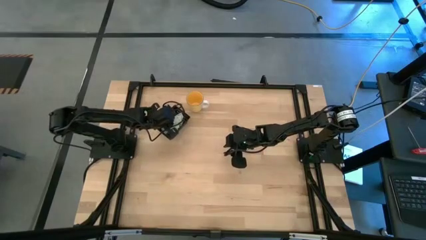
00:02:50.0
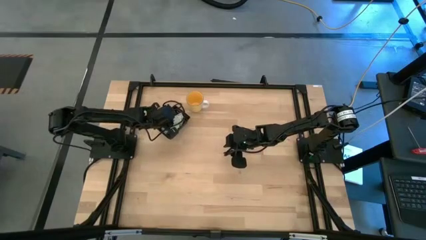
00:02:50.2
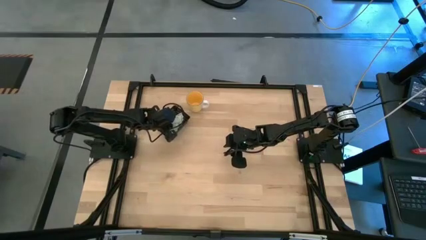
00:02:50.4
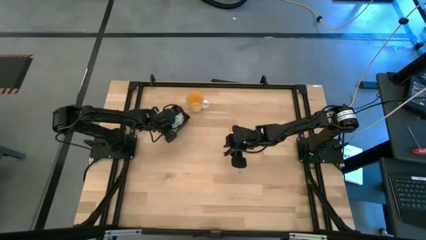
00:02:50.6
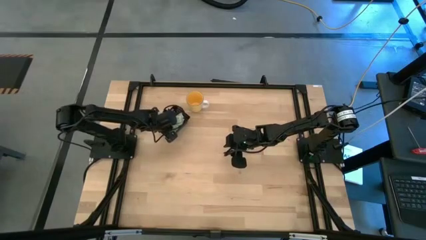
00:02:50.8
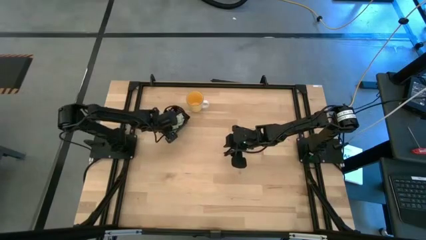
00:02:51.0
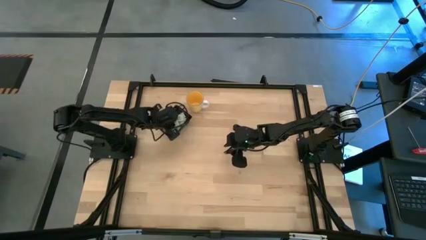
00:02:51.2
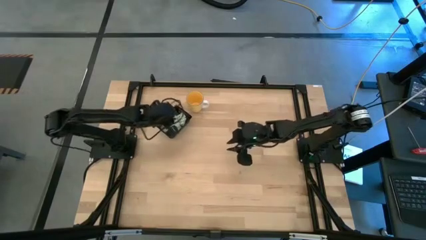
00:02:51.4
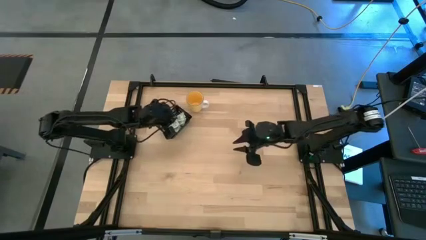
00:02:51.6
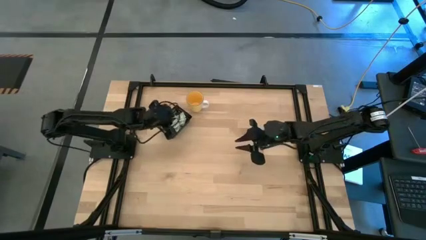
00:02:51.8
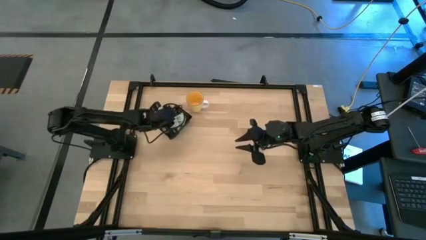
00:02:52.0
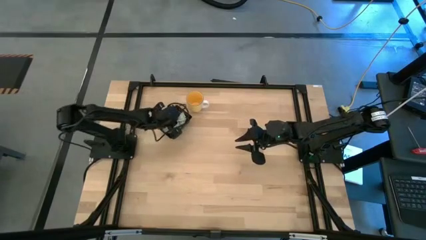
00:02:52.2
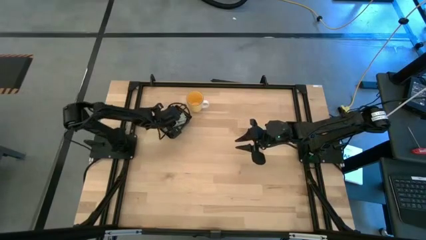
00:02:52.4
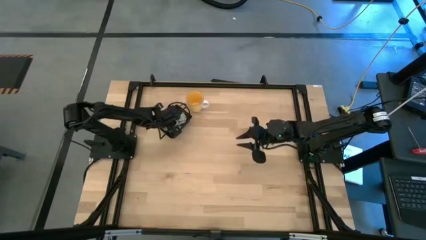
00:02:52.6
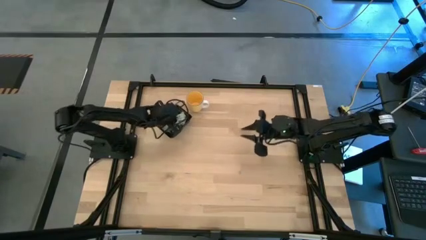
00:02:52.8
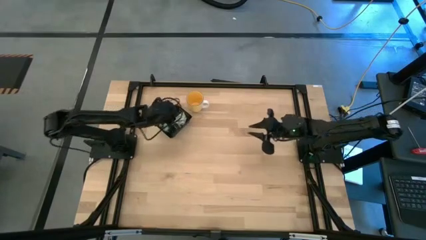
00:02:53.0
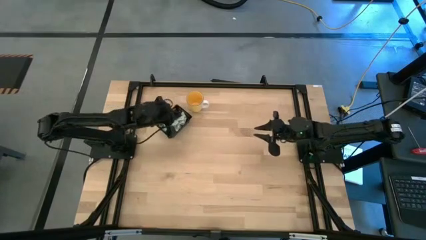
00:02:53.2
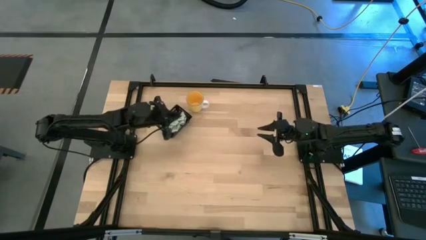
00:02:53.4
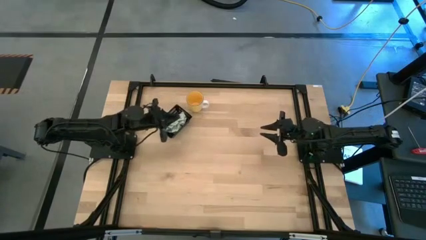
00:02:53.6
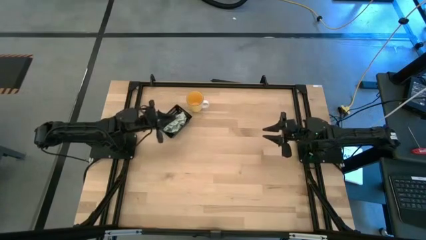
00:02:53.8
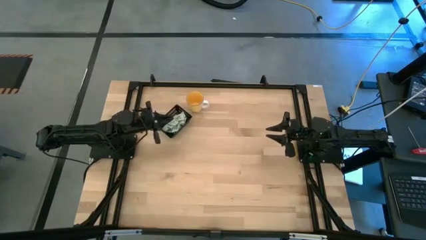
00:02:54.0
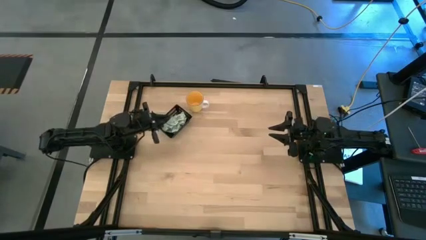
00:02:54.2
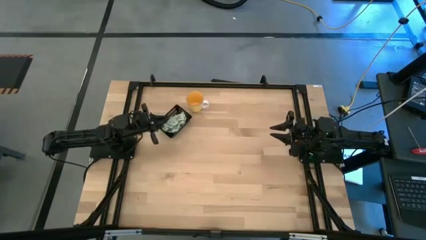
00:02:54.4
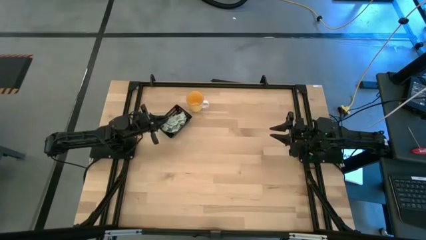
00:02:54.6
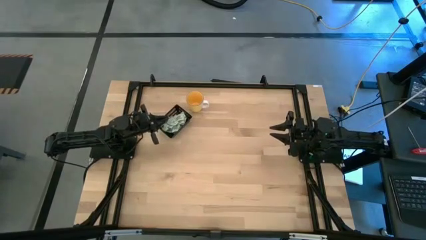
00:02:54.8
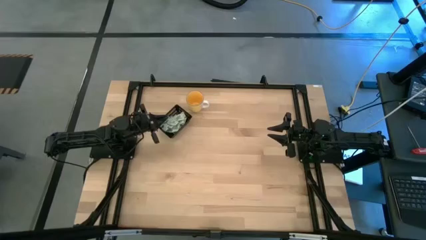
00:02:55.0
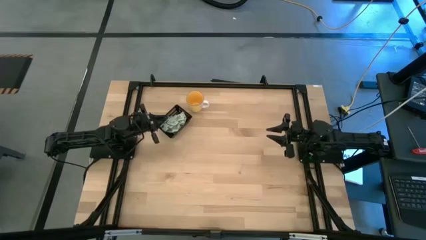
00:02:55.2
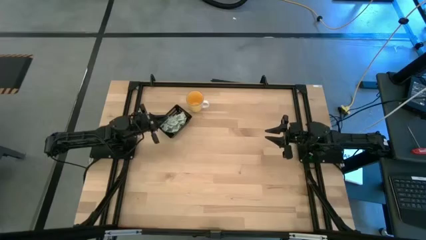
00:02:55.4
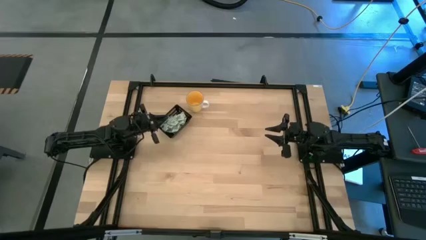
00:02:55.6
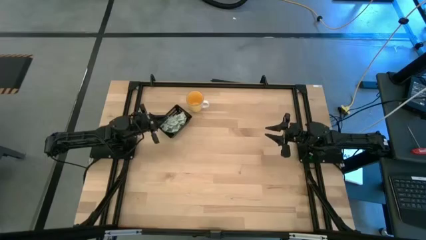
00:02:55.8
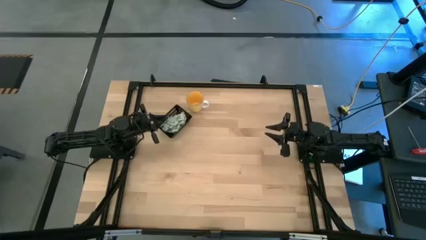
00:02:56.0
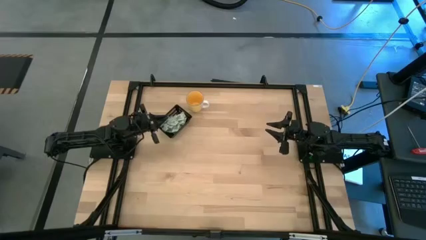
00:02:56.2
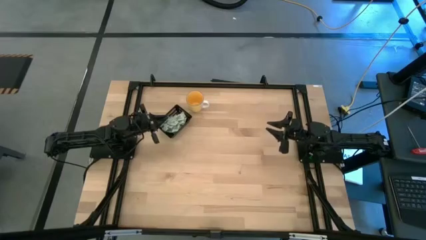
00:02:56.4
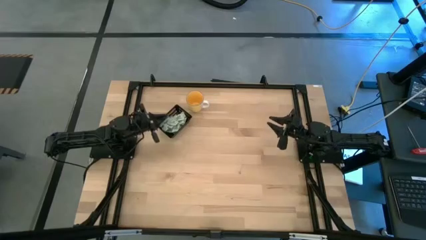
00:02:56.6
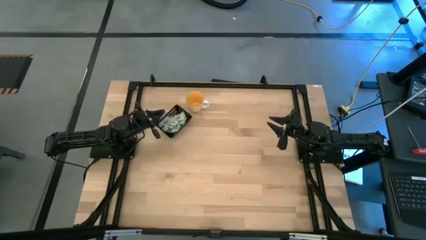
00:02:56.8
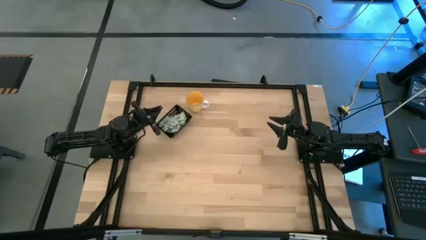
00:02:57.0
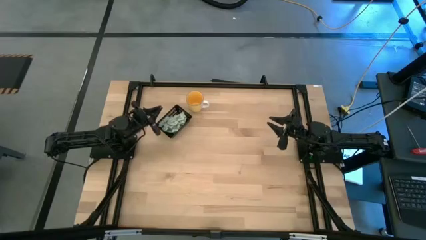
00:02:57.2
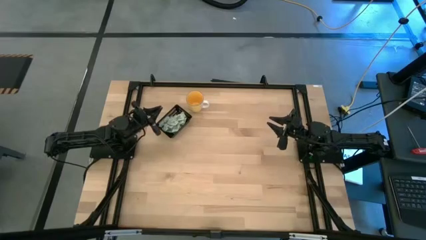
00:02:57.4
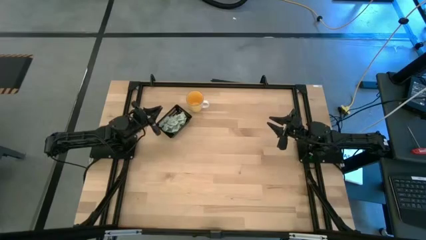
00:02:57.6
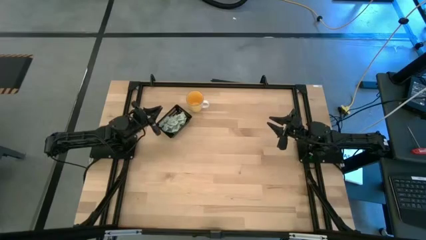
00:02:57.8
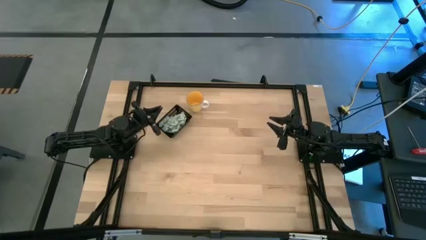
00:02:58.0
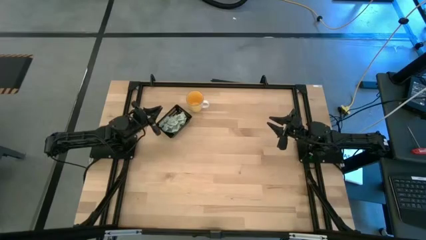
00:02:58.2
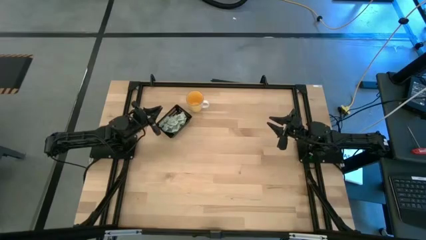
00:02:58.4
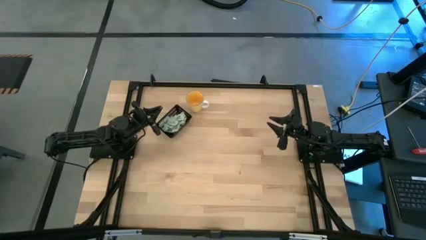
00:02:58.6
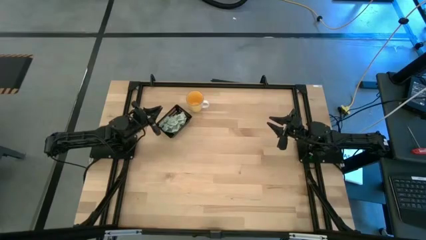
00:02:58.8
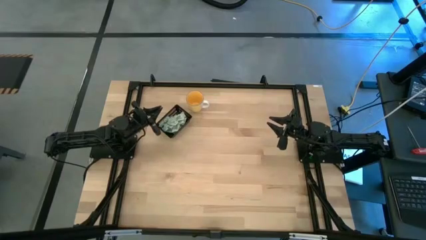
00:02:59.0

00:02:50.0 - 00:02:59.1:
Task: Pick and place Stevia / Truvia into bins
Return to Home Position

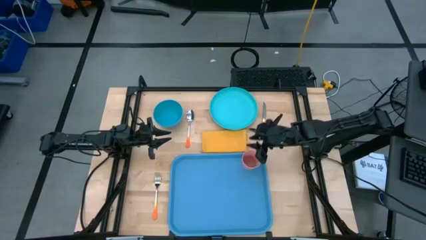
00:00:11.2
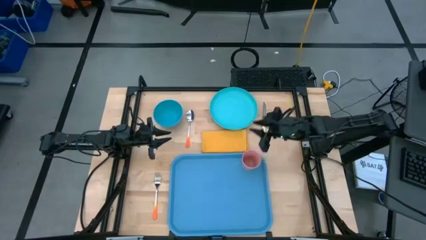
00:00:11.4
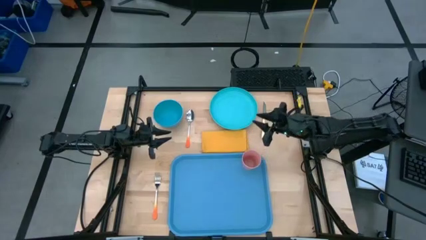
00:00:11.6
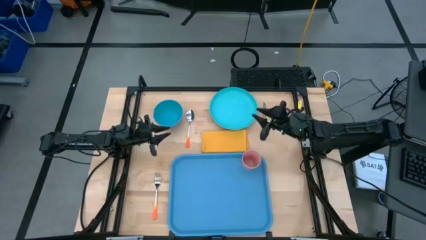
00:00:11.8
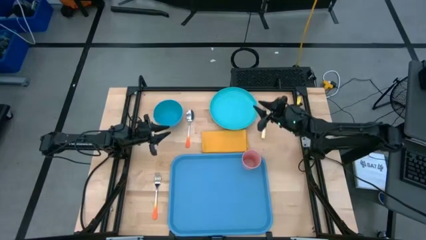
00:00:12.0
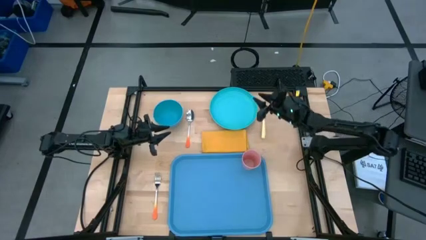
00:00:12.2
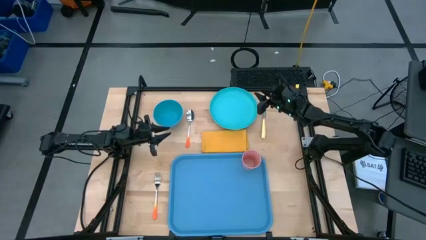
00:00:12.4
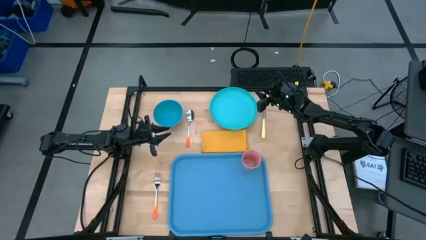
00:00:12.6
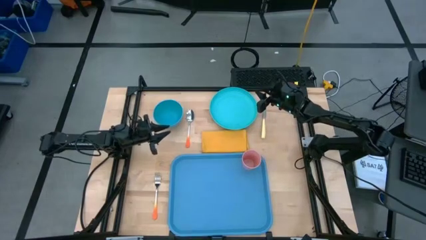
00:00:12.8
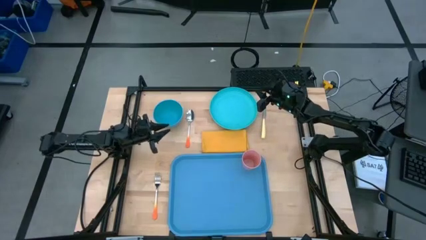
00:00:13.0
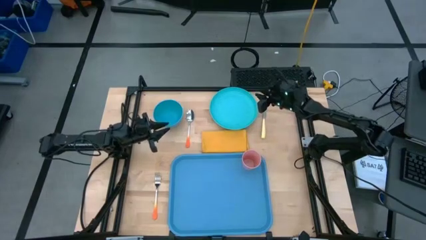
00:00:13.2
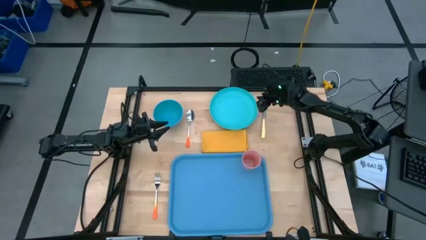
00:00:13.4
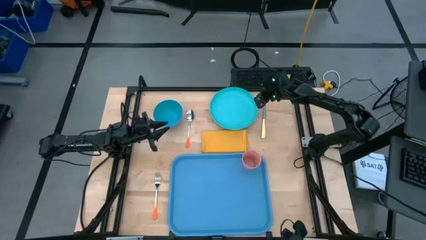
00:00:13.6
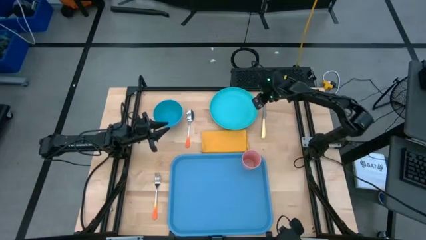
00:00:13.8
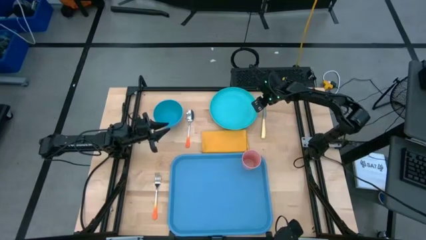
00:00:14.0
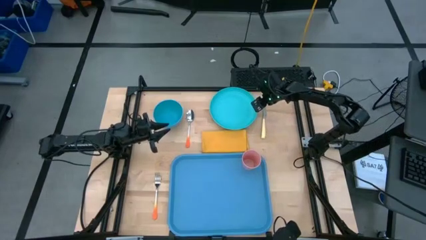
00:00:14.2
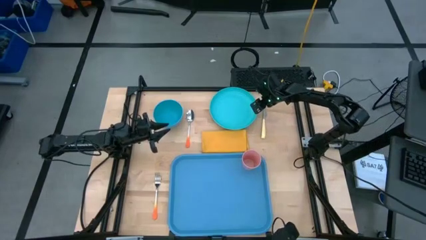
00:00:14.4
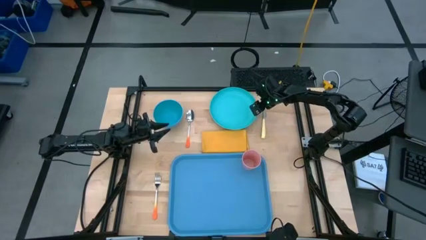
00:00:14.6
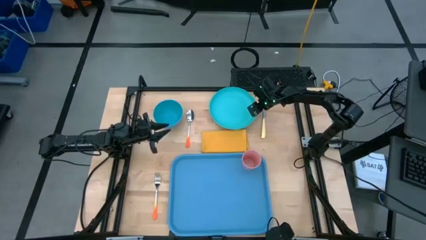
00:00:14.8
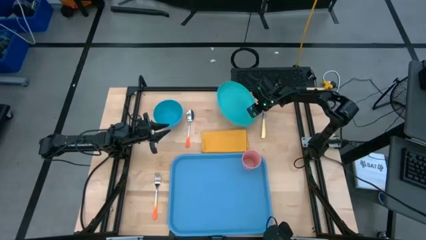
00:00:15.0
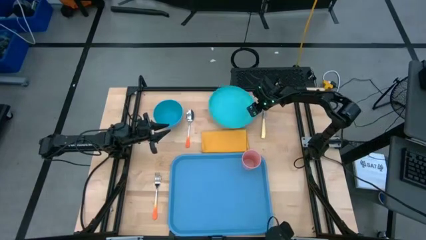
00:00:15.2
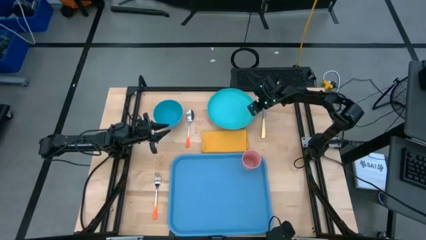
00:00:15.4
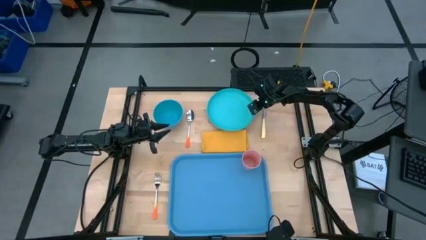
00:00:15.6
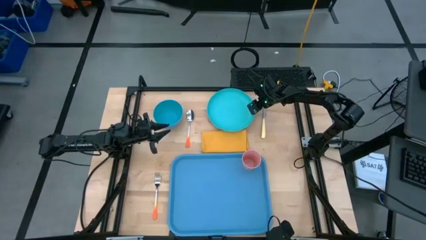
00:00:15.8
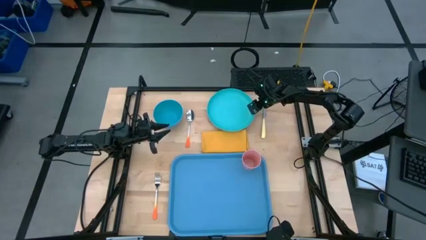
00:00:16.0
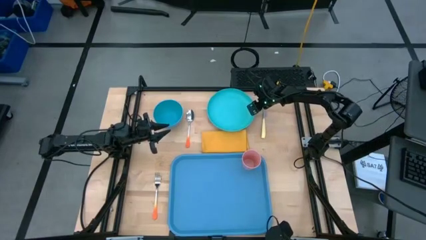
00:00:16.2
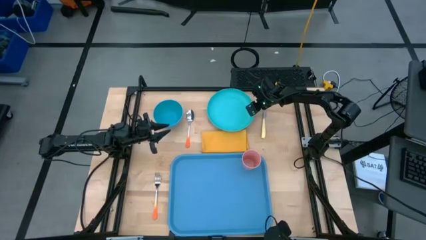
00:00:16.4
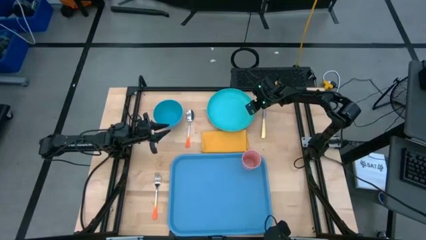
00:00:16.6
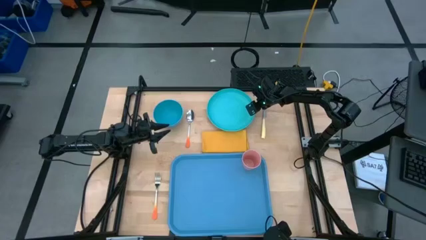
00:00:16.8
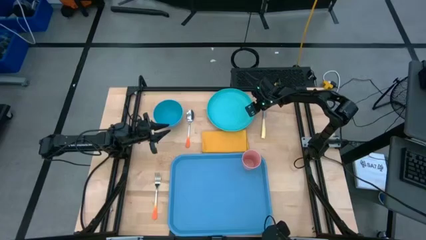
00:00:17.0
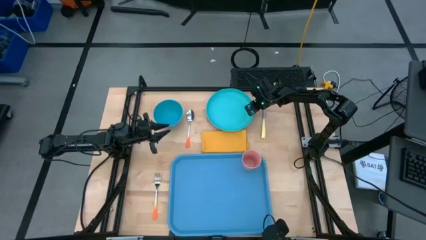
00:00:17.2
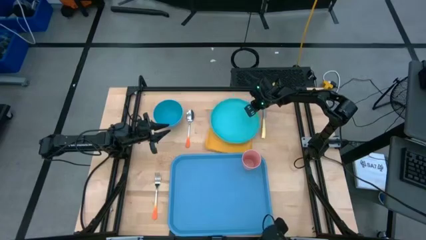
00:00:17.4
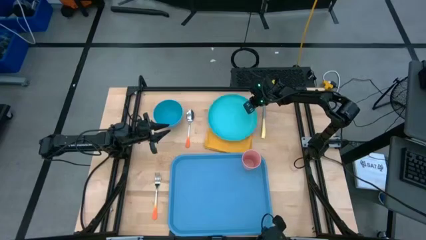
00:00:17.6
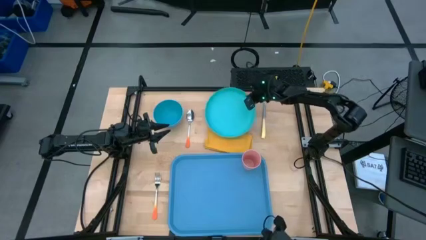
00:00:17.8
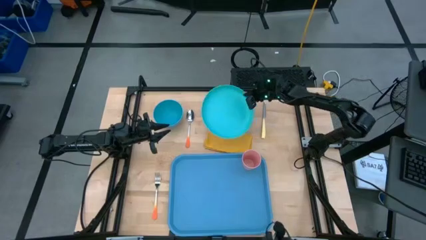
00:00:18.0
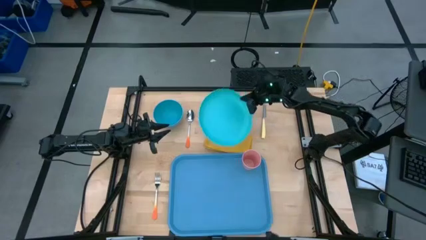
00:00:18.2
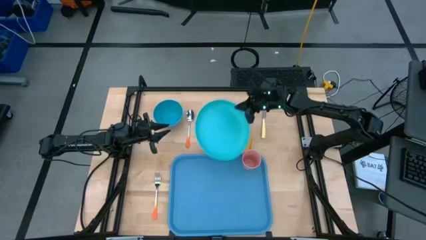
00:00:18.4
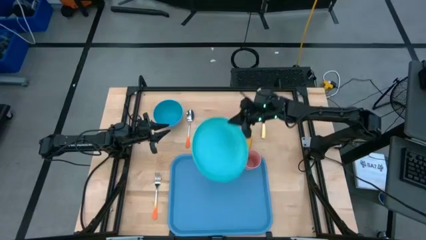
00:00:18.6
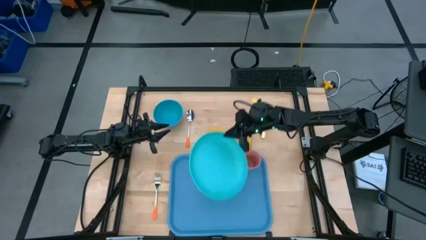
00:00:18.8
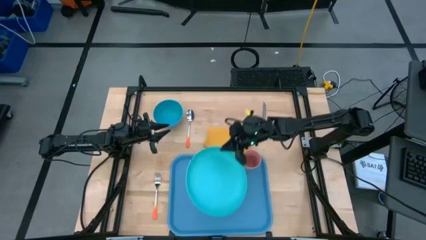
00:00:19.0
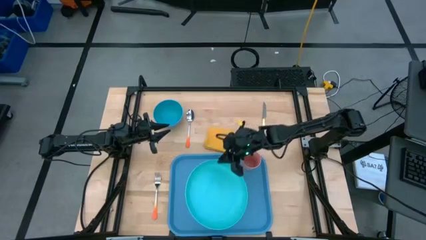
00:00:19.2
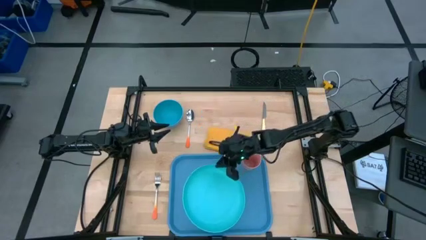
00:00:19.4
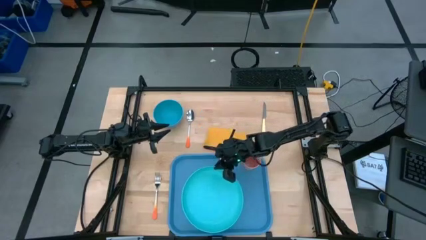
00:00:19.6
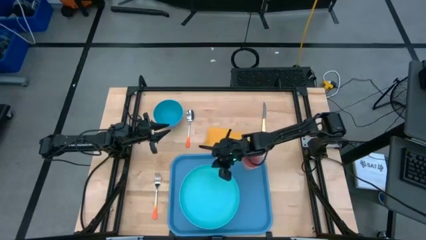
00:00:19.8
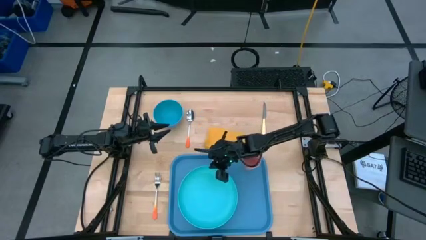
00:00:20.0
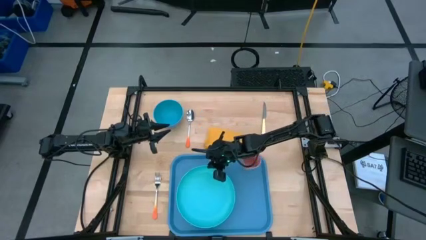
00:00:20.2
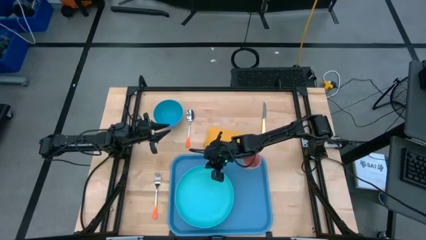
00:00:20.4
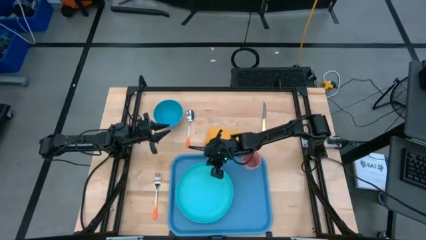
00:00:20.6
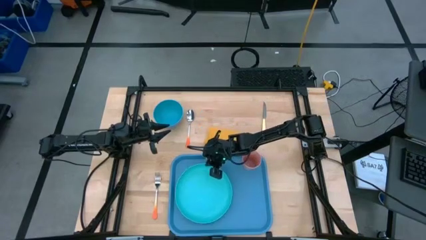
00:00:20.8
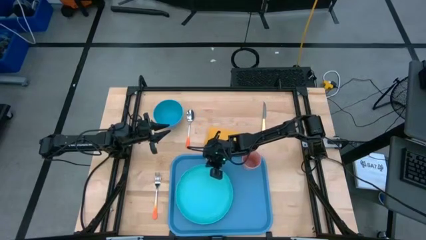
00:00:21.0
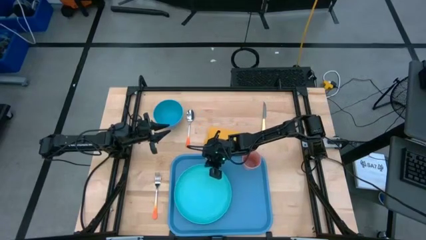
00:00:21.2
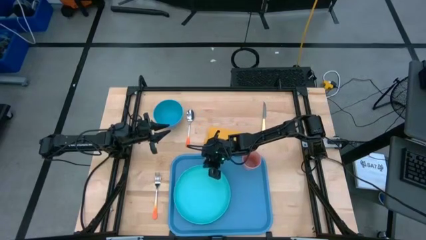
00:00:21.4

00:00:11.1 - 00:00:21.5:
Task: Set up tray
Put the light green plate on the left of the blue serving tray
